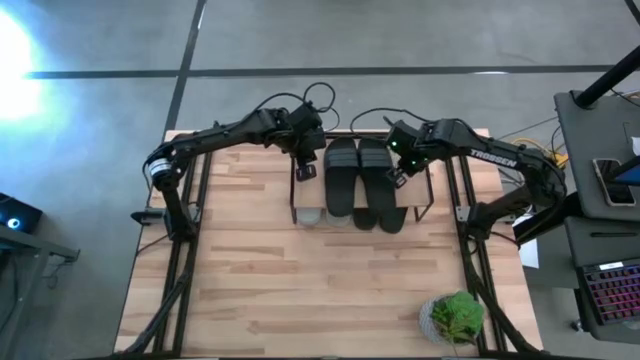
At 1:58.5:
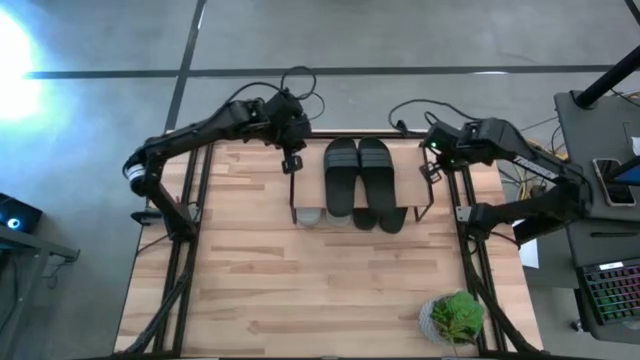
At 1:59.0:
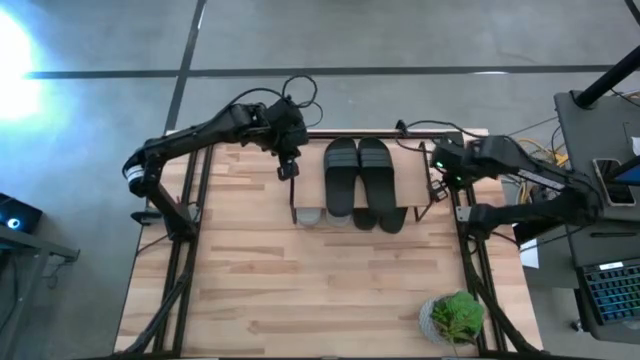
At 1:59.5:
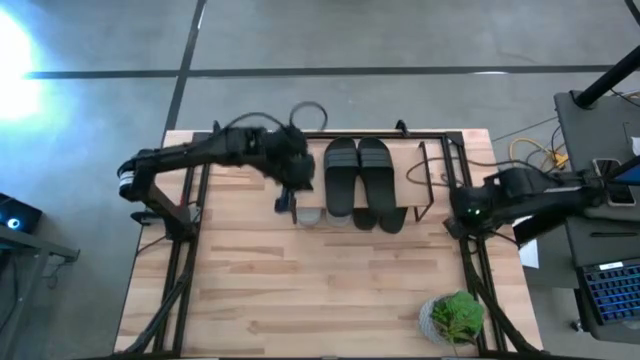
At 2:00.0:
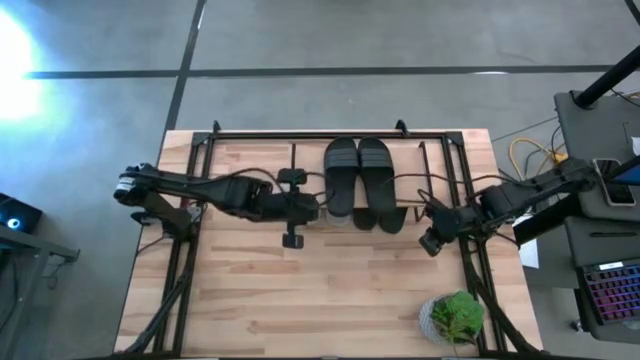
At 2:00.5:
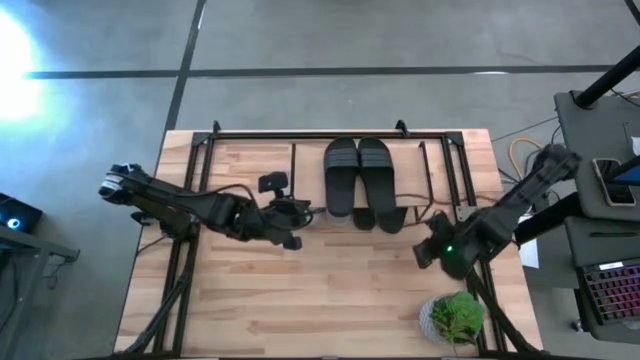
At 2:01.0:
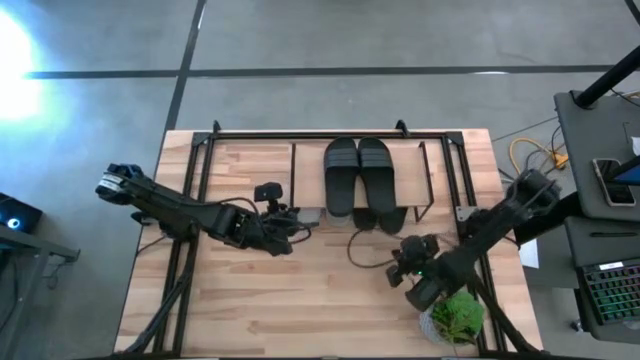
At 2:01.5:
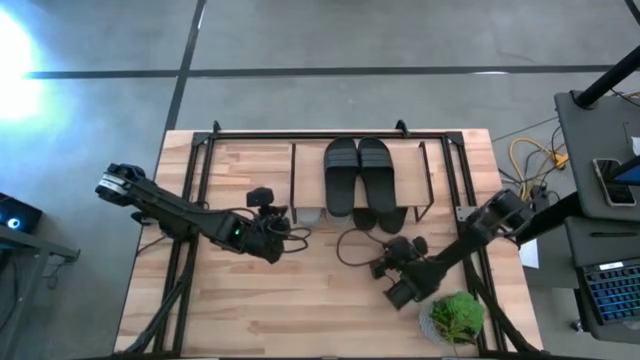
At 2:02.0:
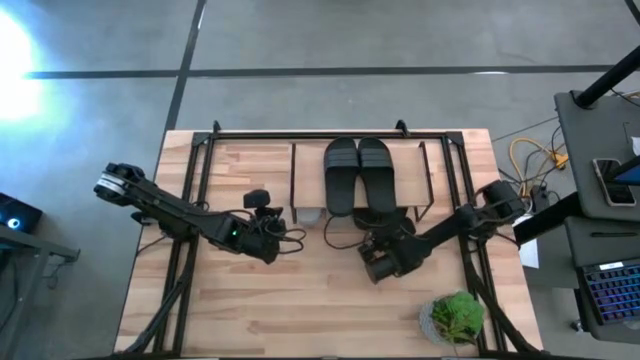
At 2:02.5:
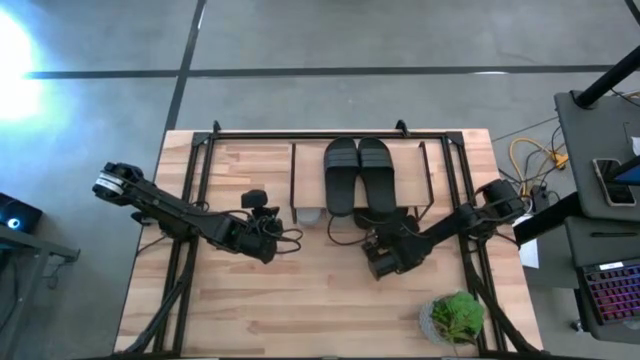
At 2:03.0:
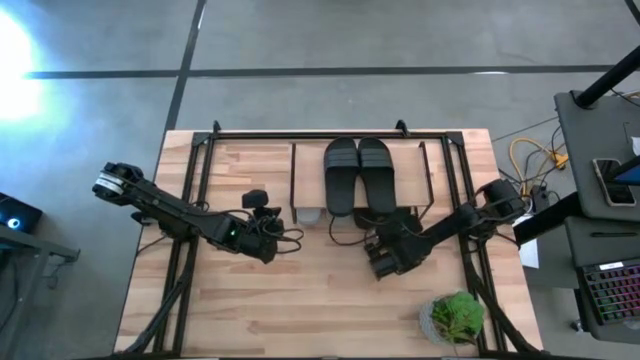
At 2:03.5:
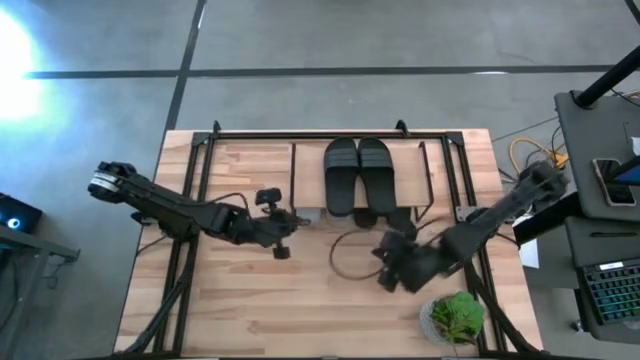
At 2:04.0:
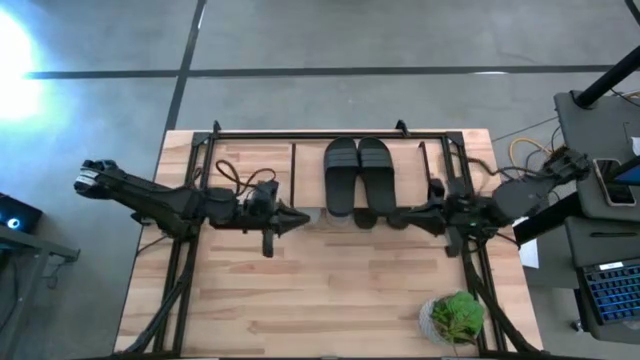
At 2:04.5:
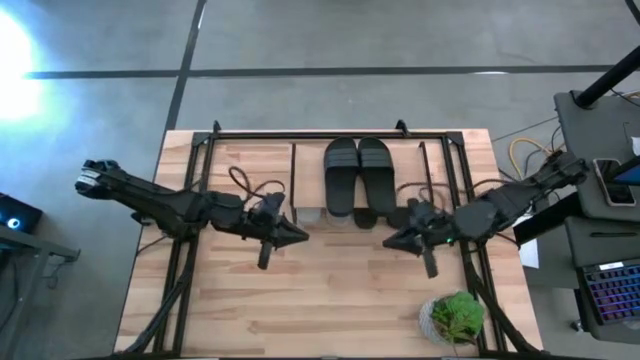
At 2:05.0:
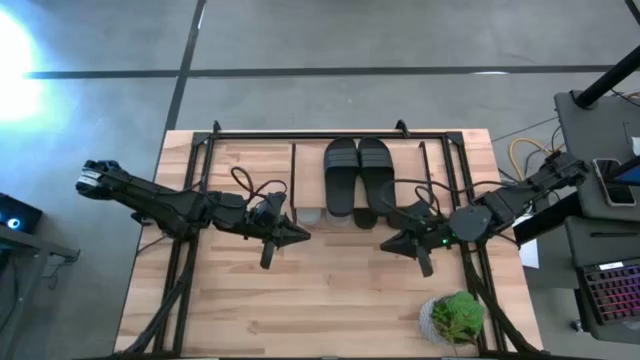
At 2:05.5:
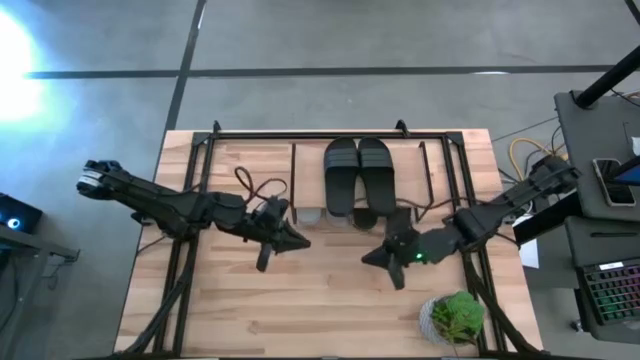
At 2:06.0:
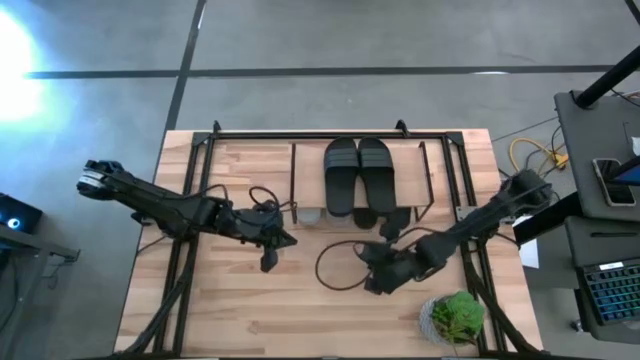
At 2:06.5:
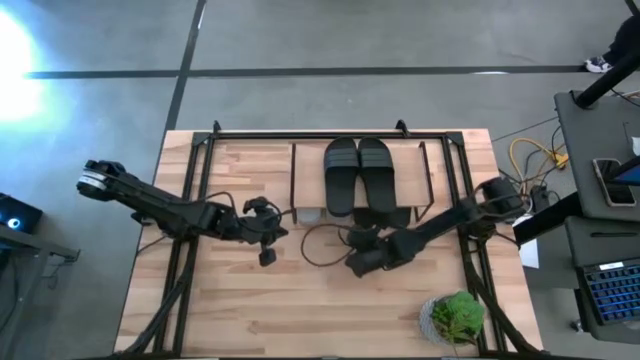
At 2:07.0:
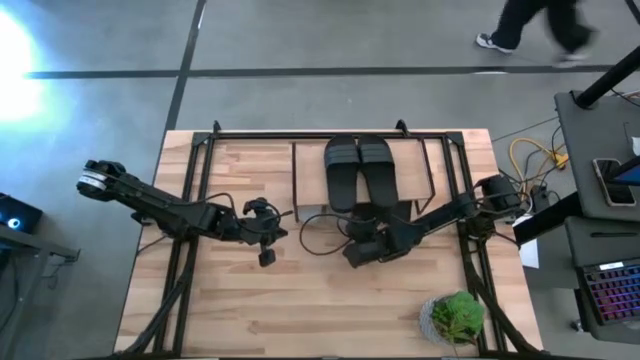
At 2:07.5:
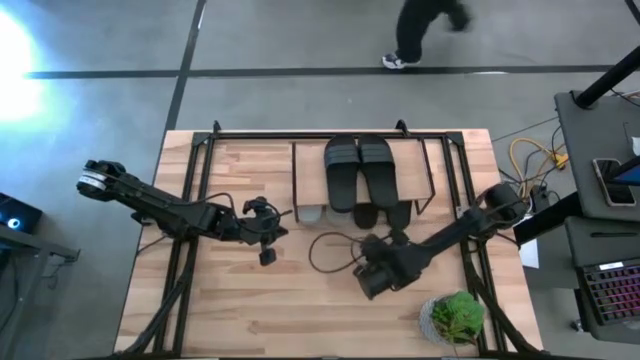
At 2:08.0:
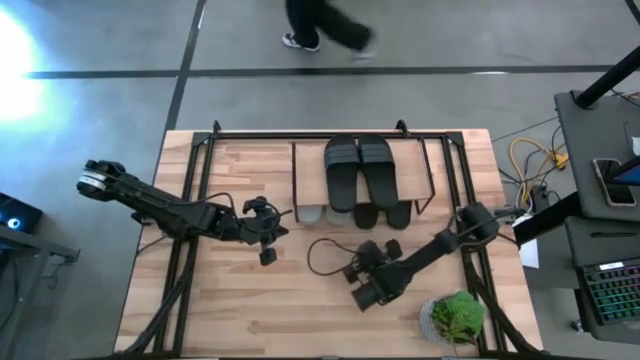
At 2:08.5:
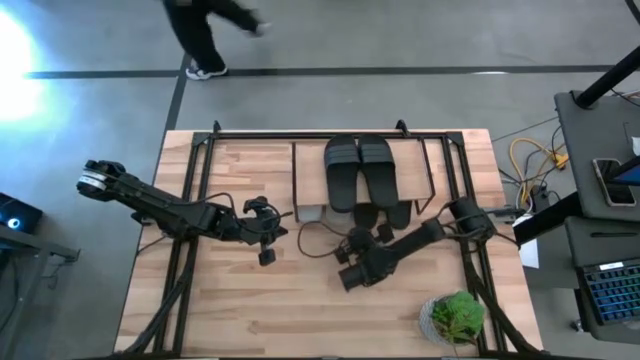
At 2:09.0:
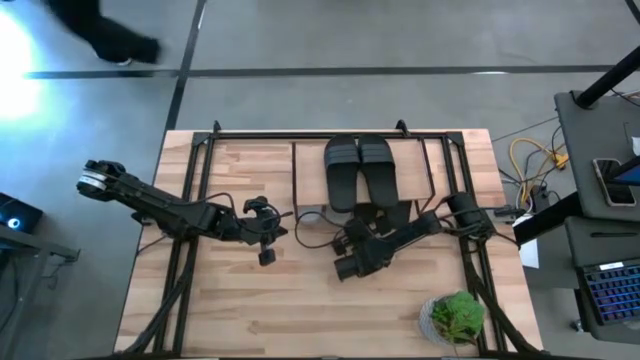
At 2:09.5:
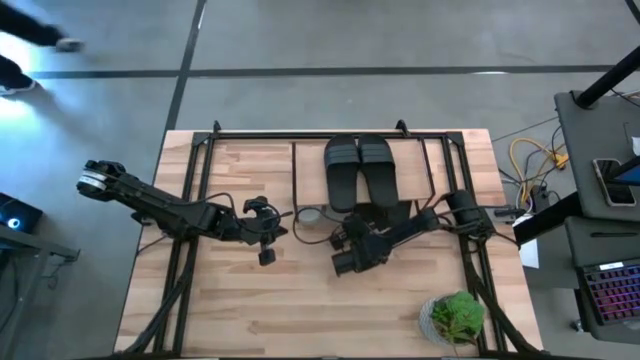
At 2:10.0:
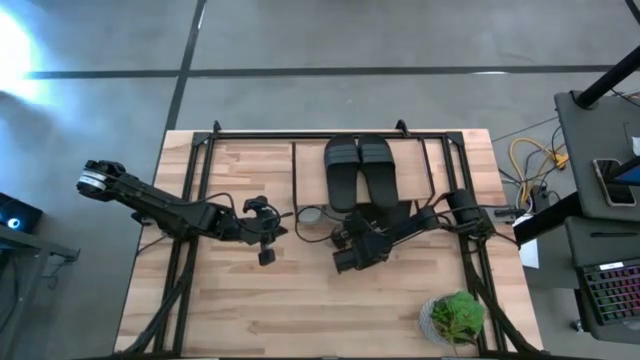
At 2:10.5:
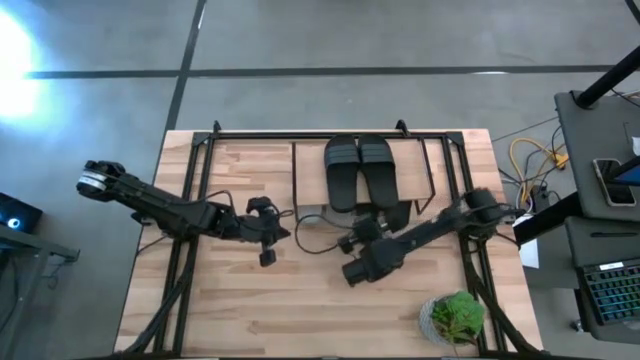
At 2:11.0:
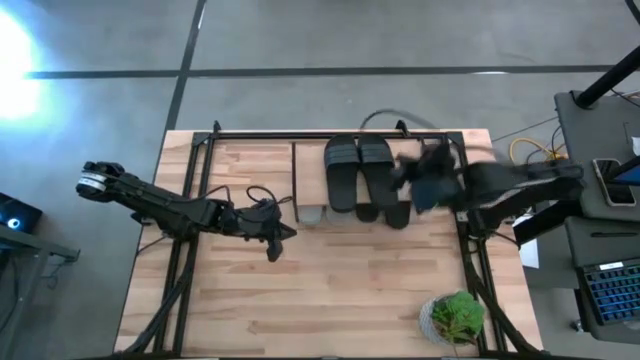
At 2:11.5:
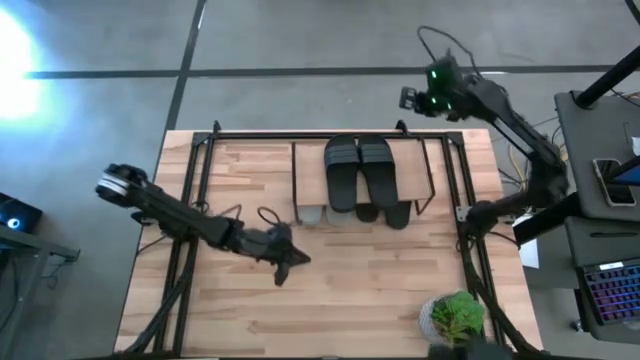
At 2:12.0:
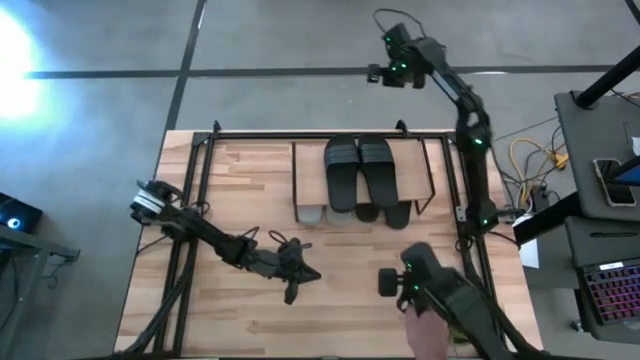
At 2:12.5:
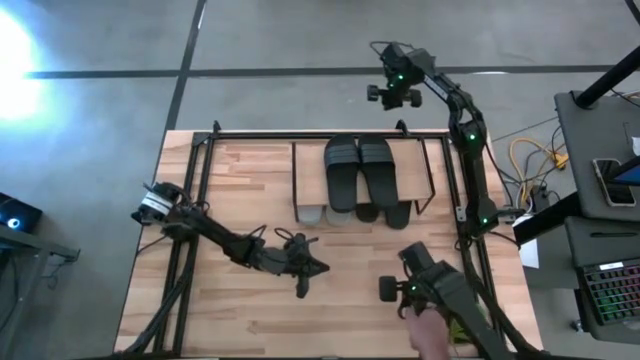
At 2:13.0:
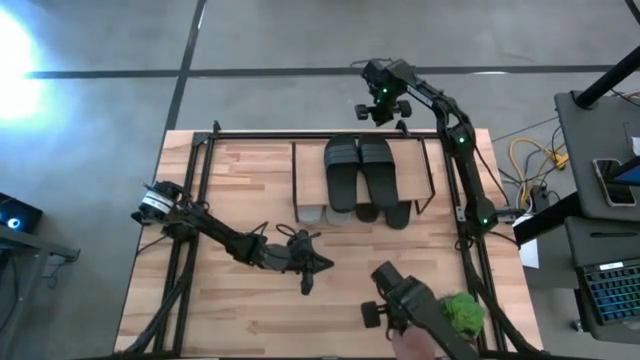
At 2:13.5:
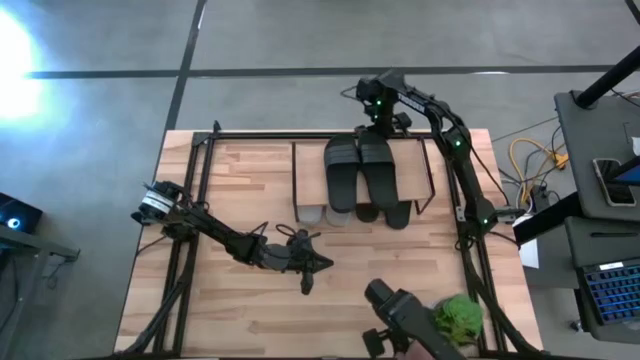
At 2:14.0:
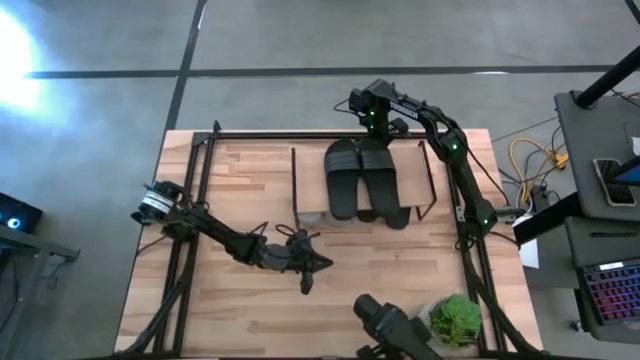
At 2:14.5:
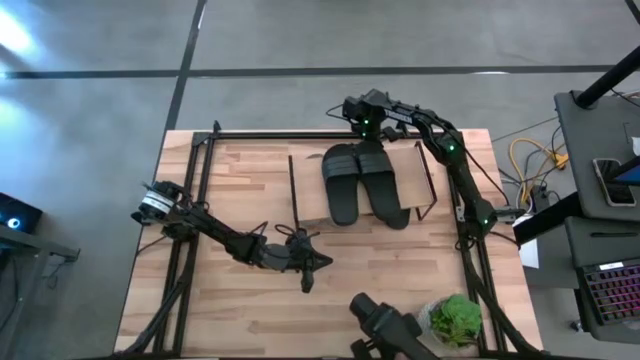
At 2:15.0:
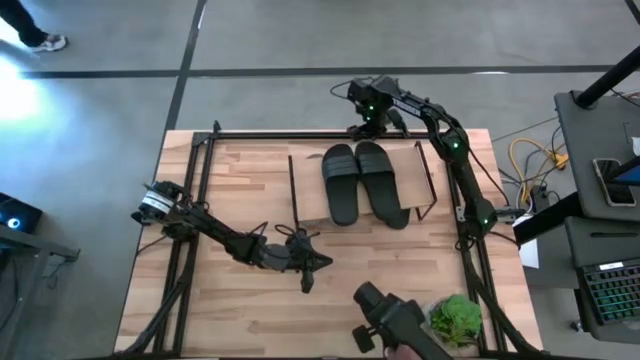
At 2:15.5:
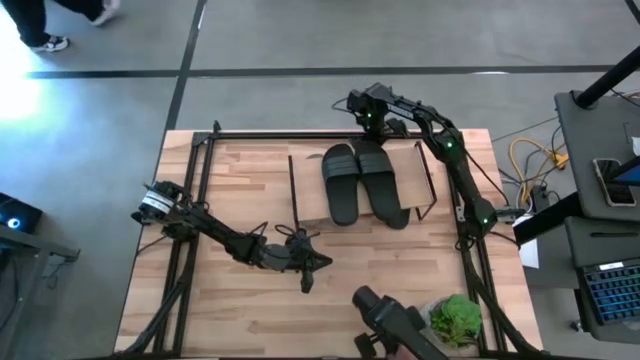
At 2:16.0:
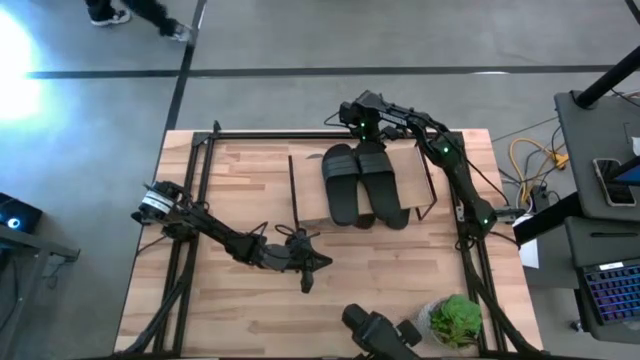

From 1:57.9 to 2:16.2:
Task: Pick and place slides into the shelf
Adjust the black slippers under the shelf

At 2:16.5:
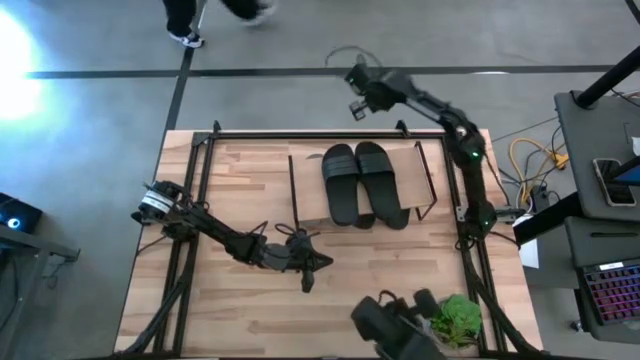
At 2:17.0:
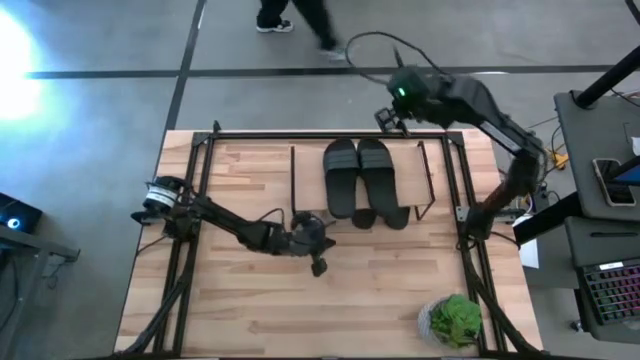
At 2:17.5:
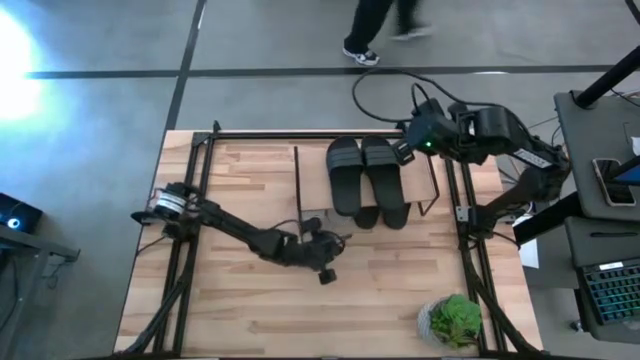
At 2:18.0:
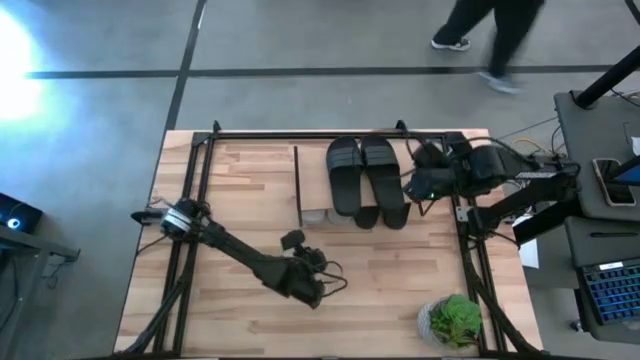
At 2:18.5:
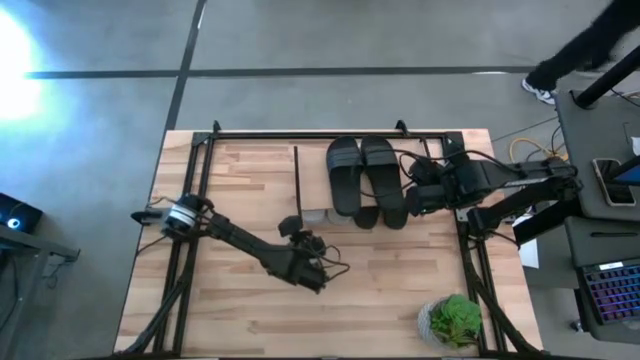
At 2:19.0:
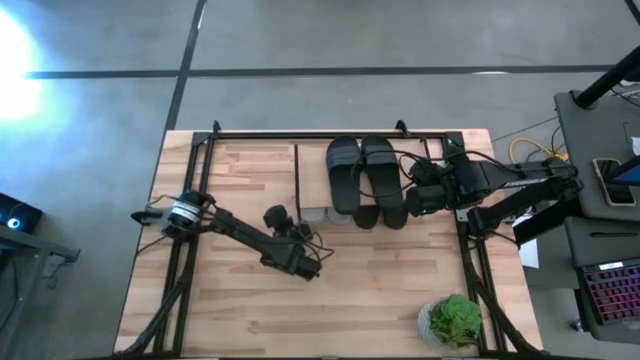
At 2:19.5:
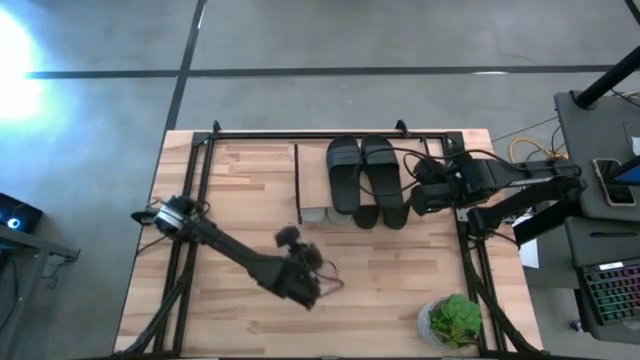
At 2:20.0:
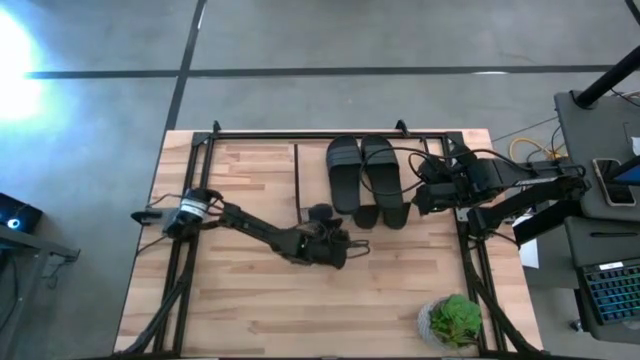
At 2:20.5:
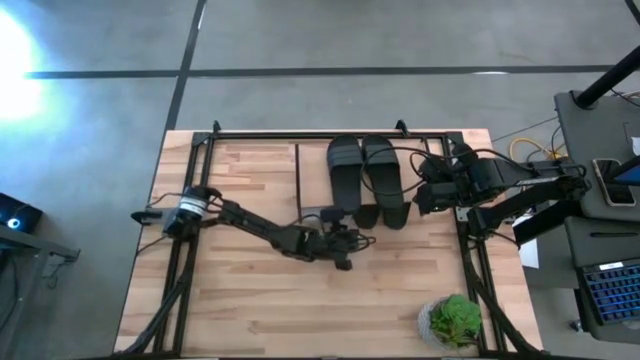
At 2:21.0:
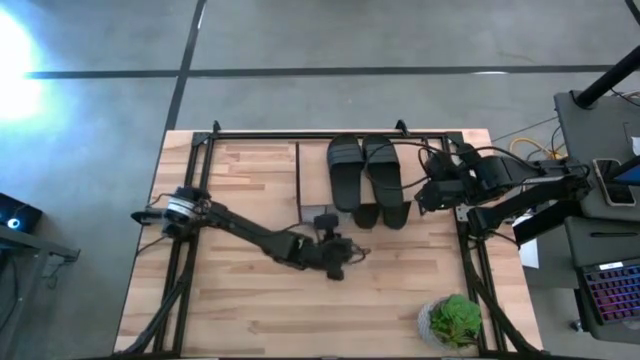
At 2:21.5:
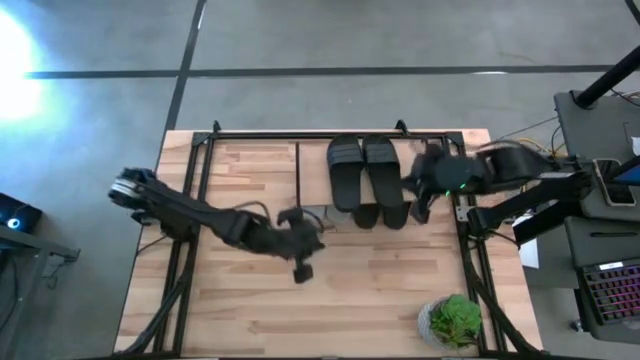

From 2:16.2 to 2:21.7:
Adjust the shelf on the table
